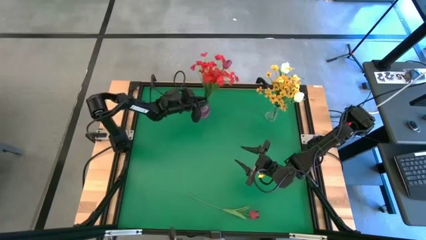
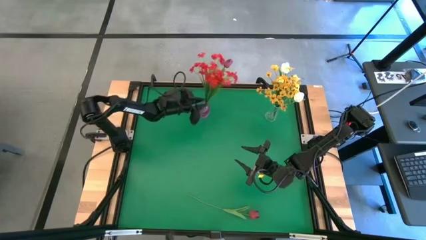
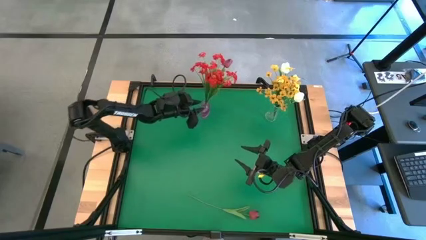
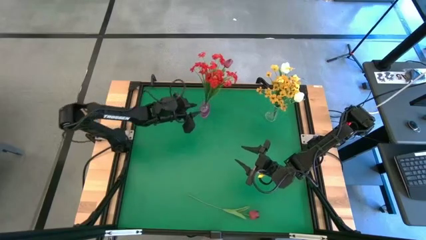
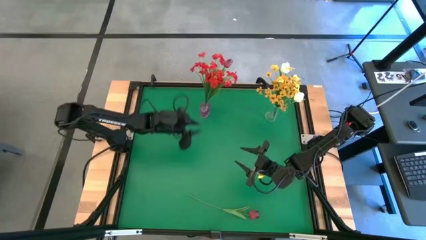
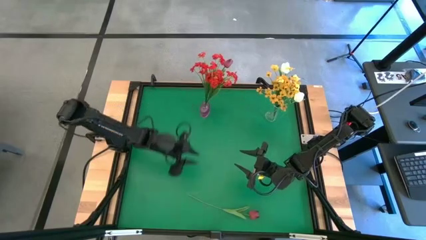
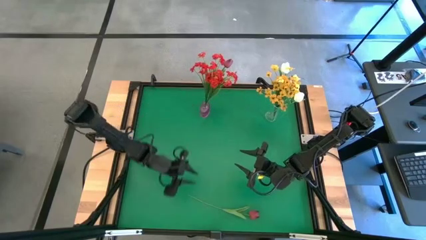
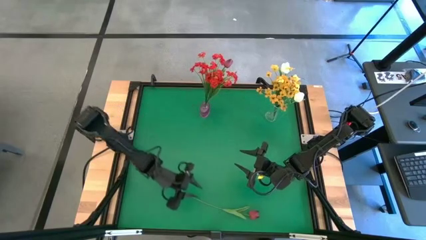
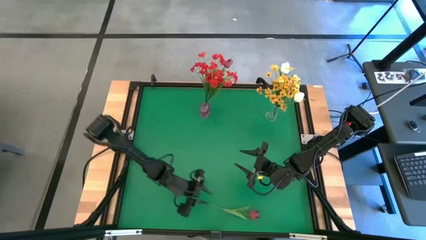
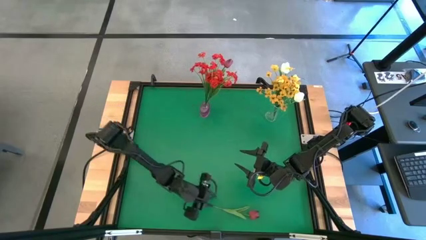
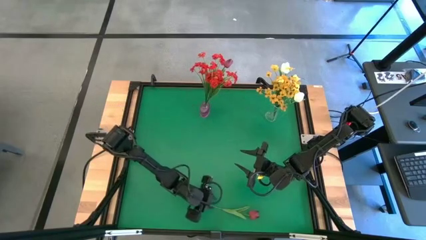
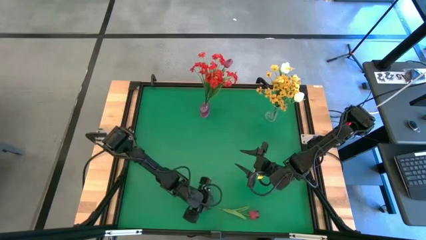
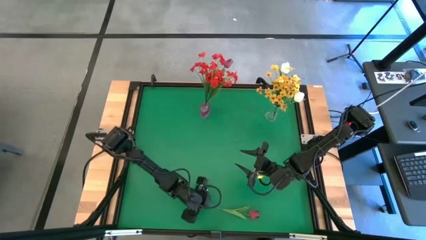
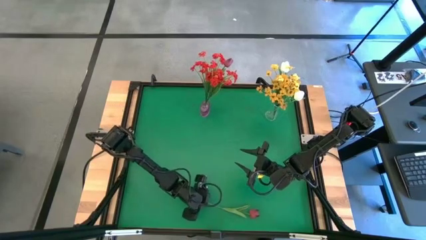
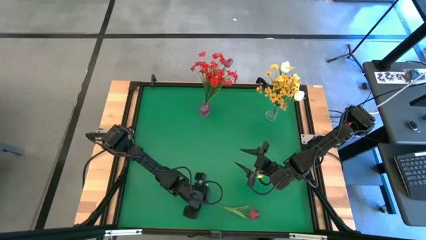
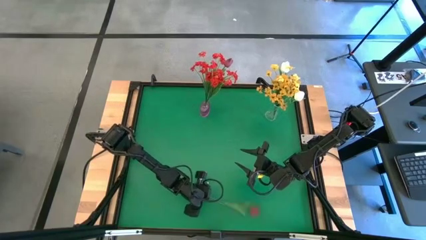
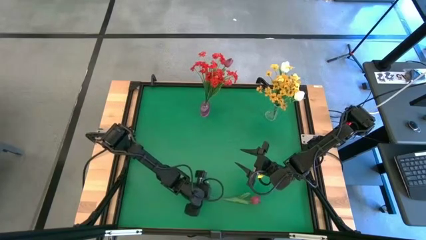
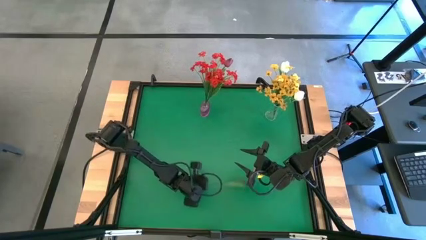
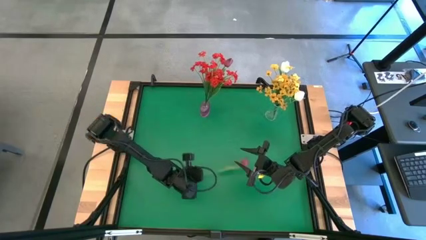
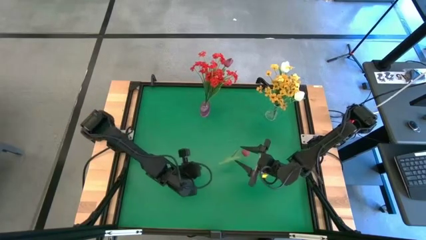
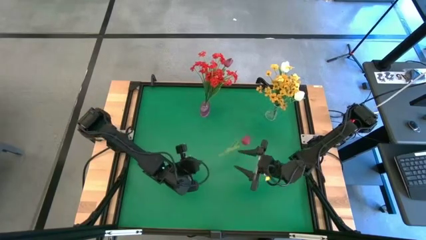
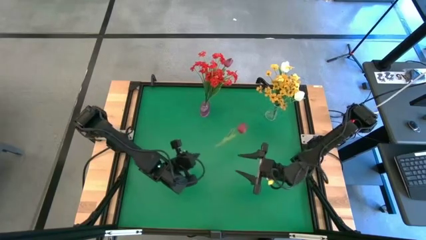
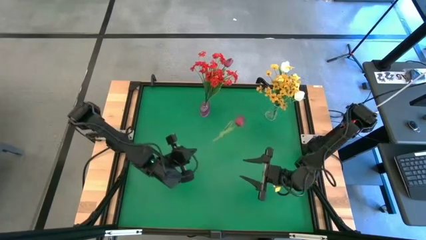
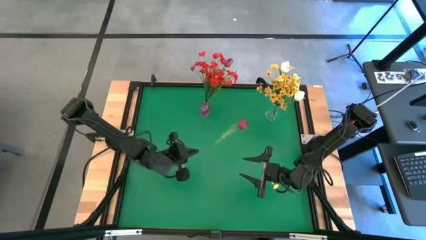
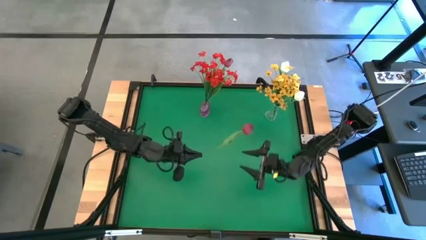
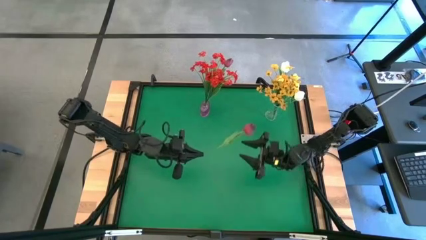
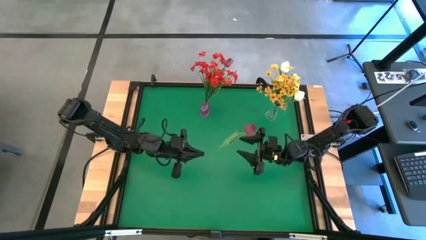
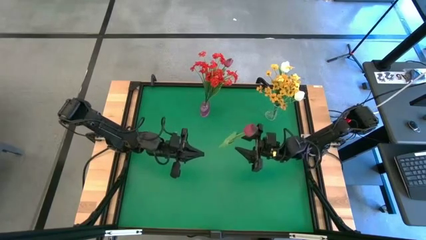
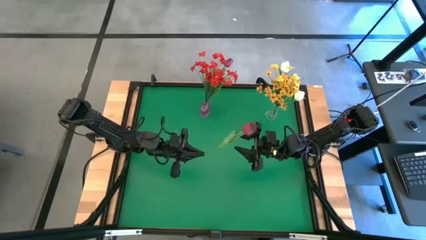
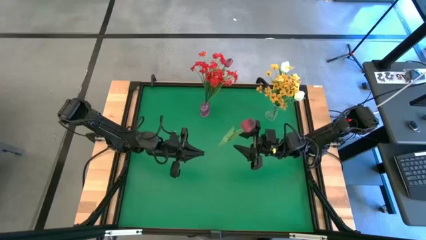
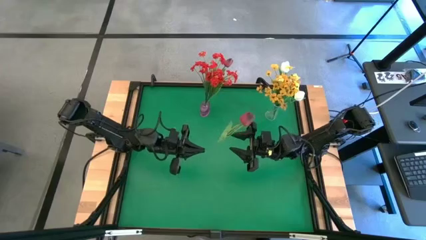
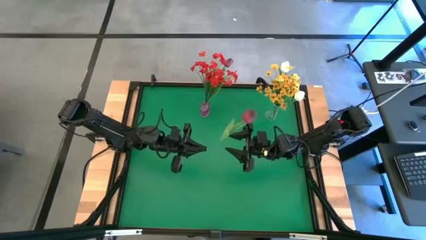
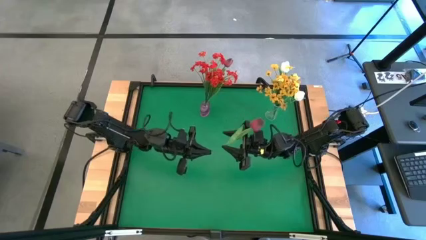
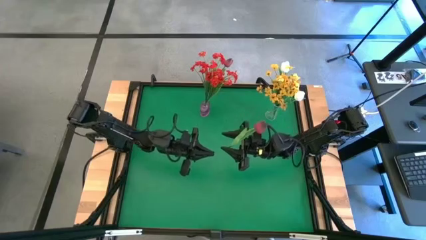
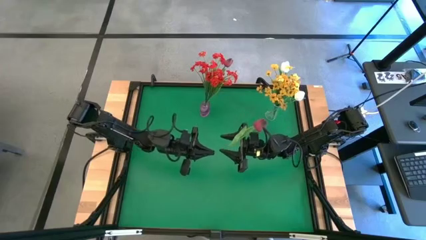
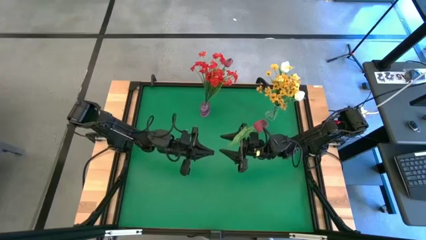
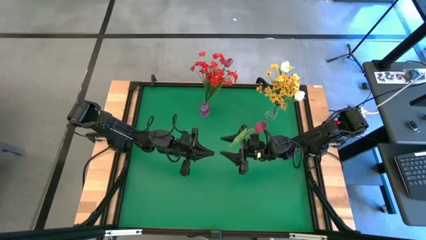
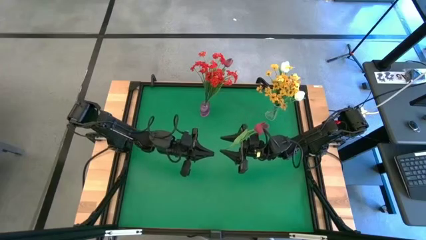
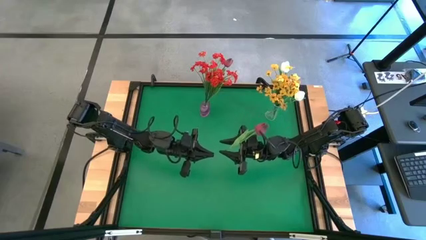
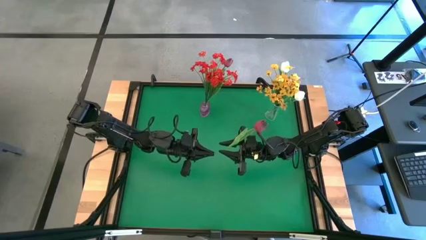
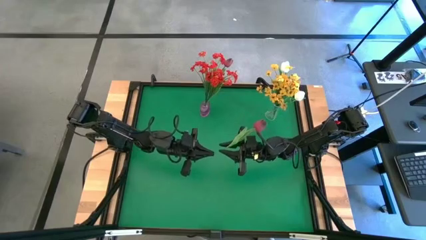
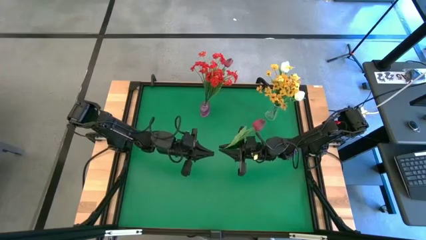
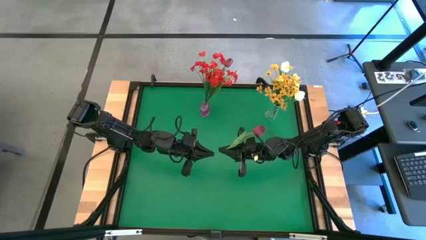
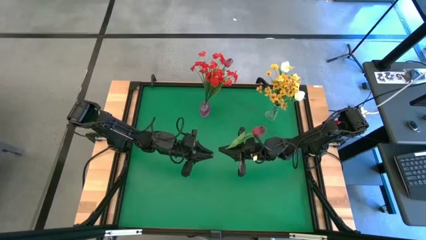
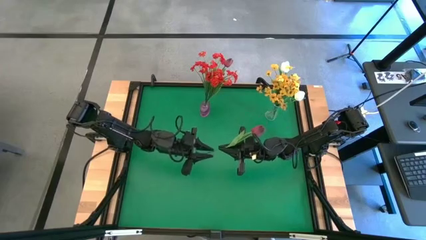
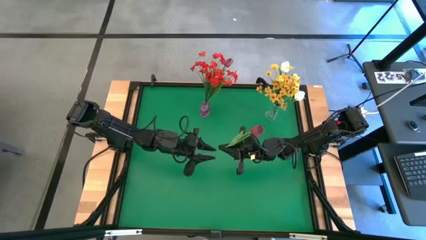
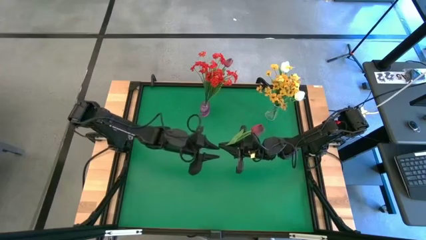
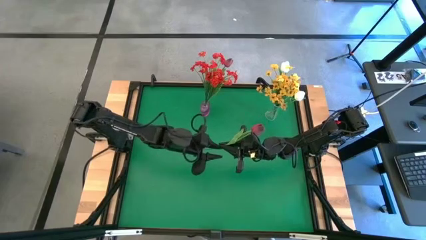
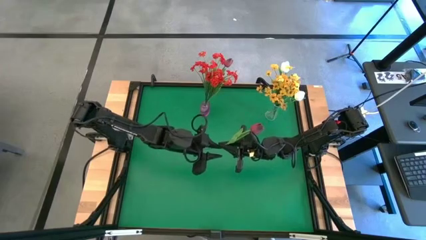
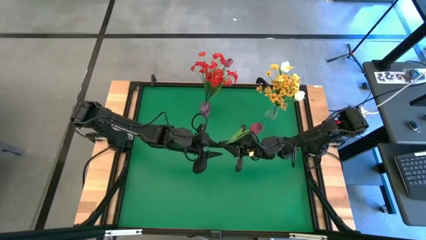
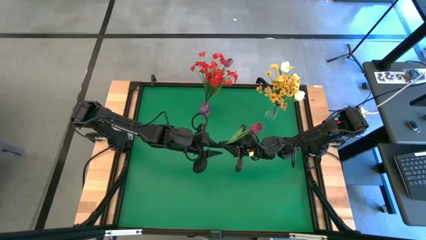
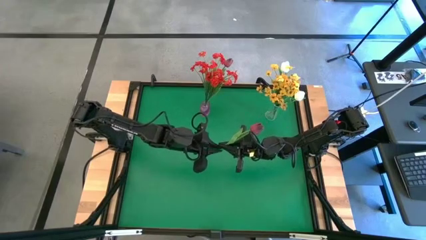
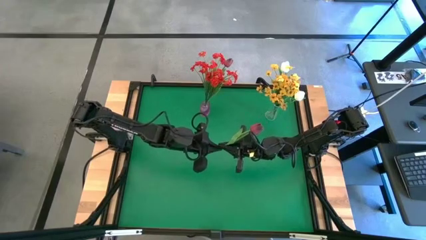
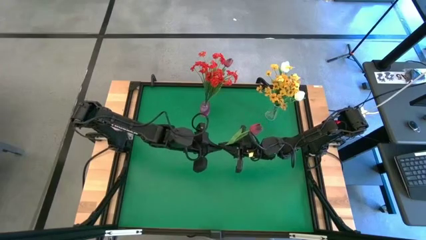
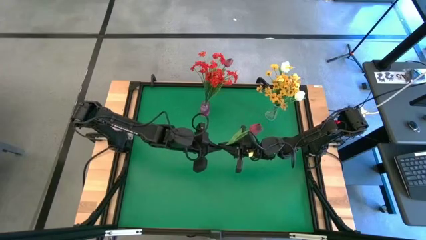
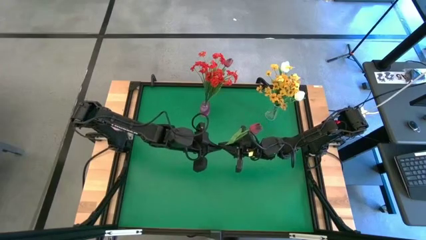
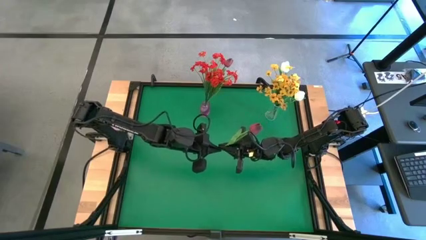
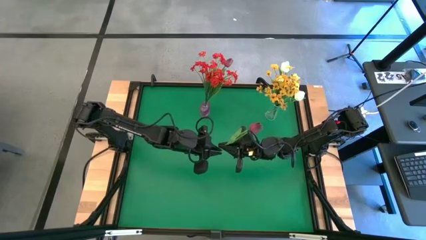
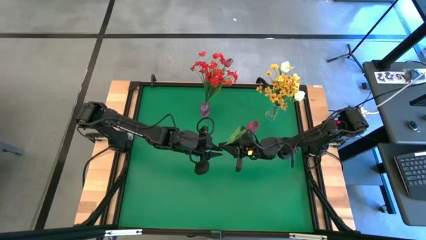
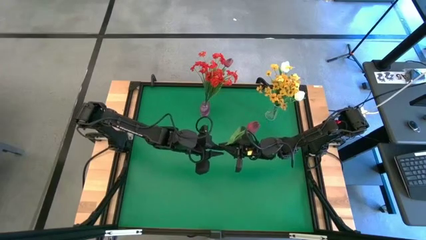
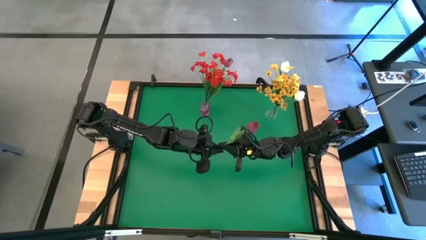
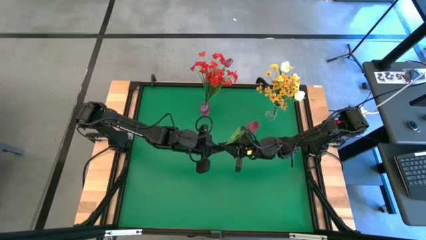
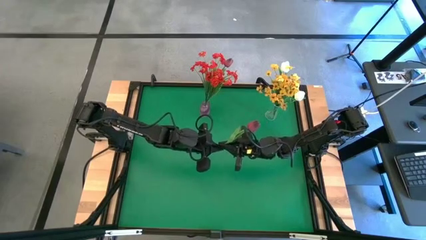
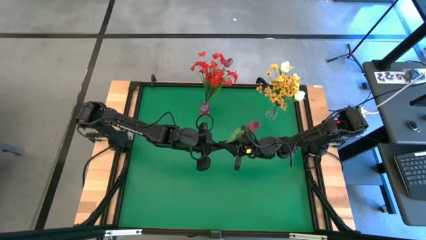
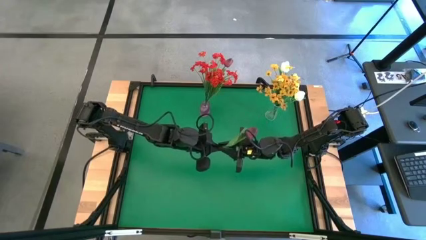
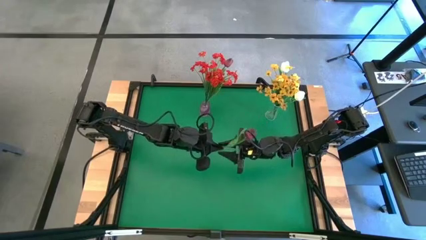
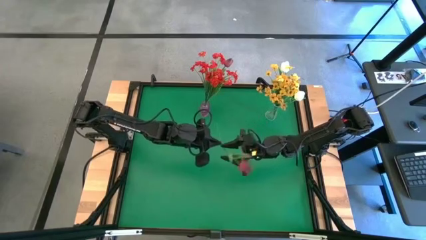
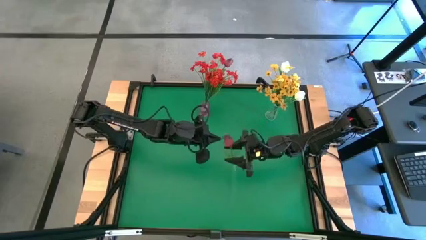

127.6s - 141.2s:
Task: Sort flowers into vase by color
Put the red flower into the pink transparent vase

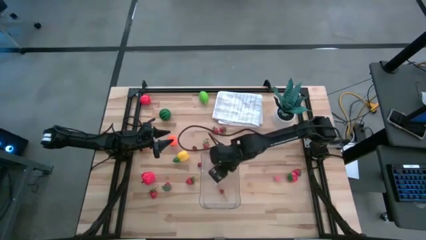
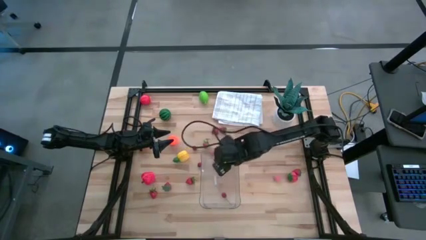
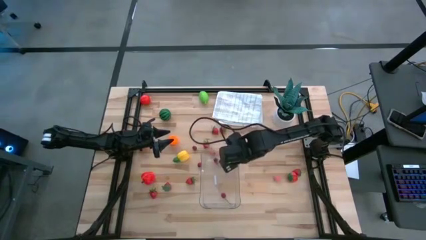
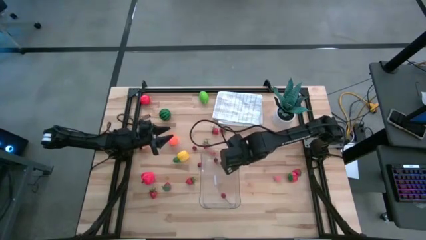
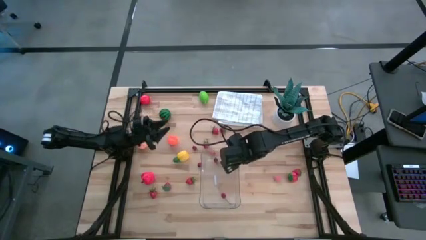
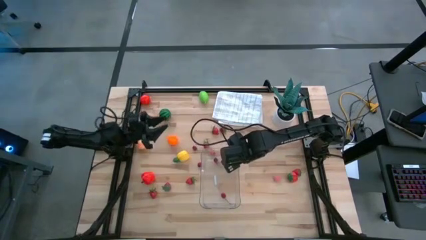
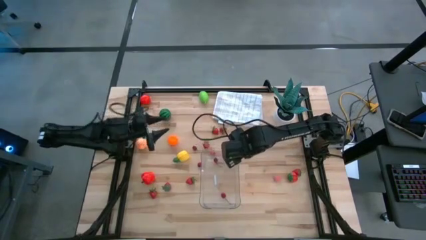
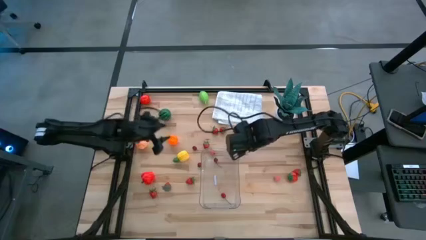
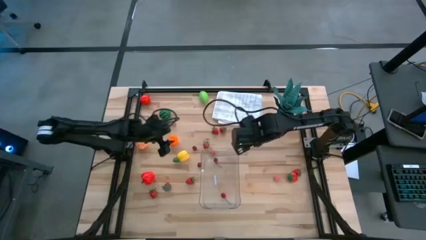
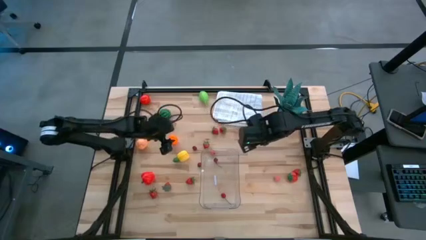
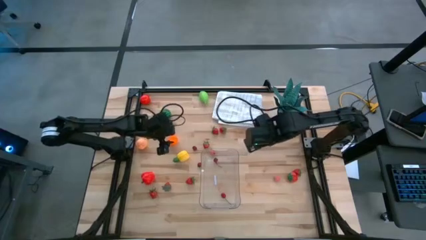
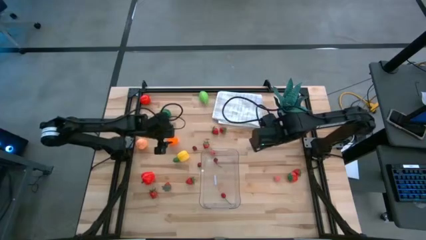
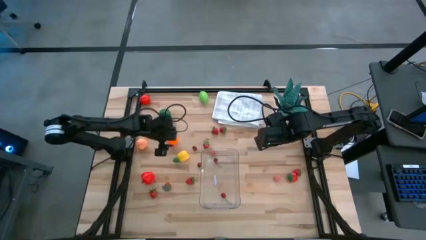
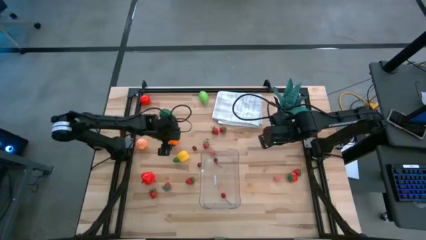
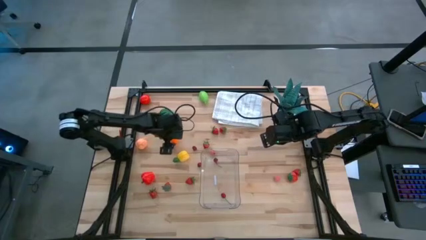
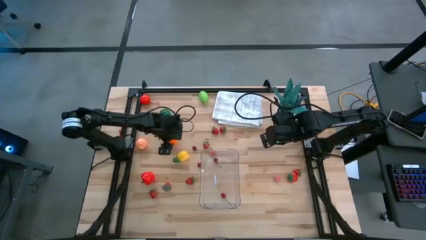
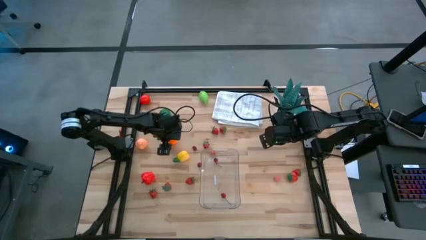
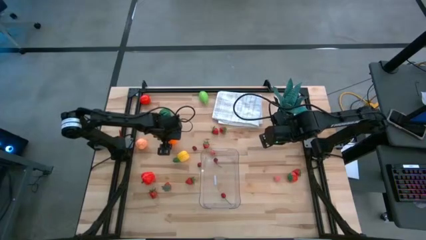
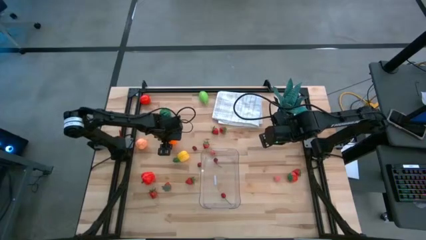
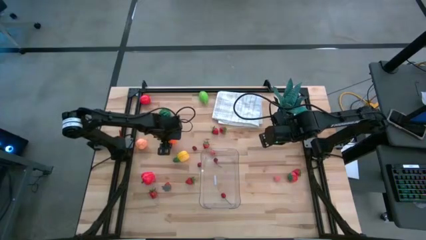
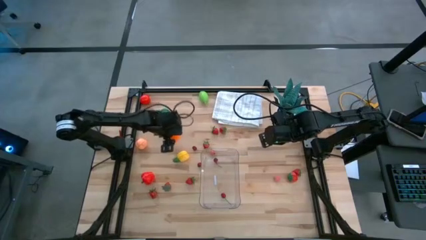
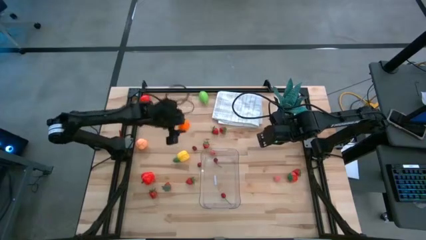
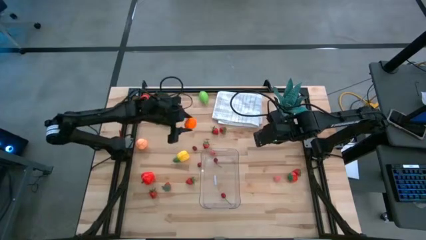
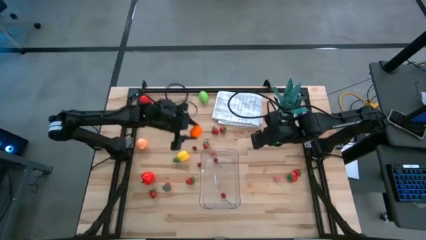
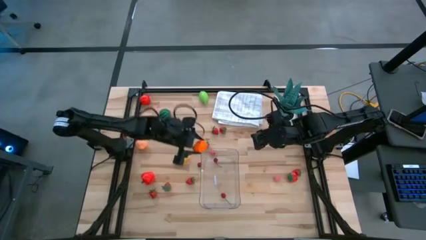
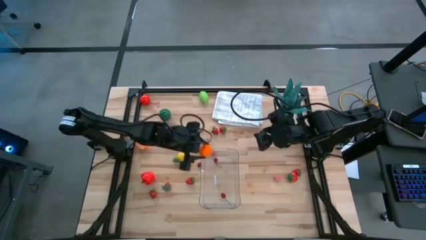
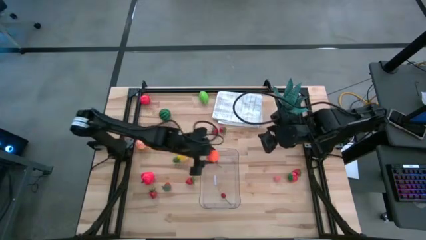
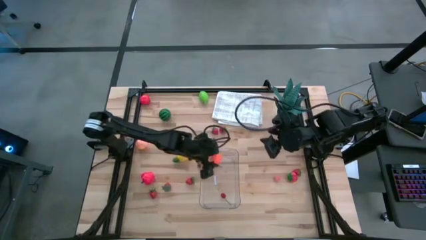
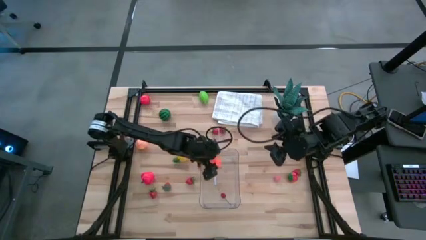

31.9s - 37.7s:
Task: Pick and placing Produce into tupperware
Put the orange pumpkin into the transparent bin
